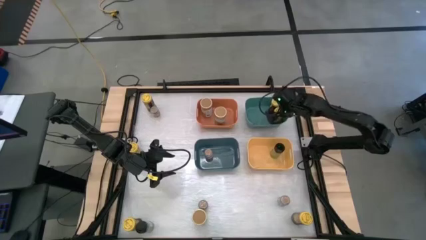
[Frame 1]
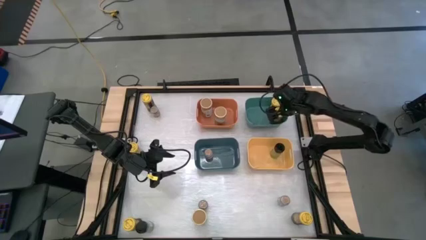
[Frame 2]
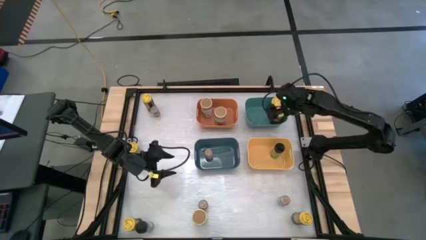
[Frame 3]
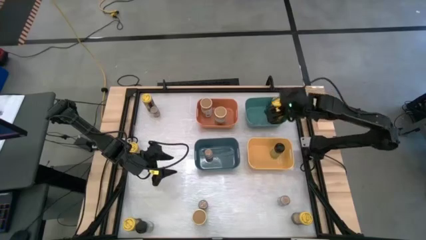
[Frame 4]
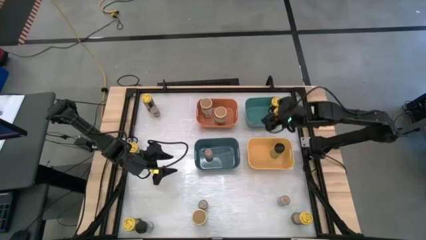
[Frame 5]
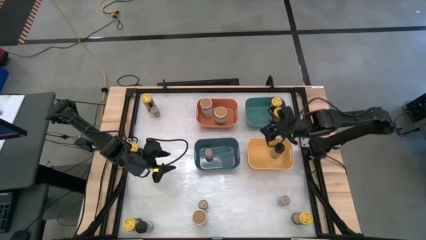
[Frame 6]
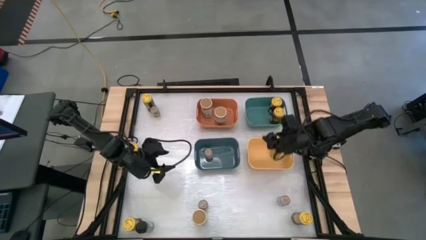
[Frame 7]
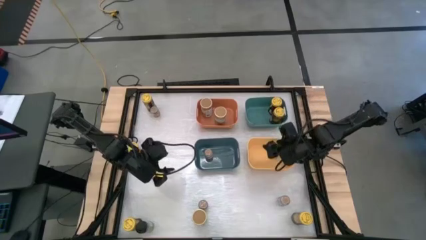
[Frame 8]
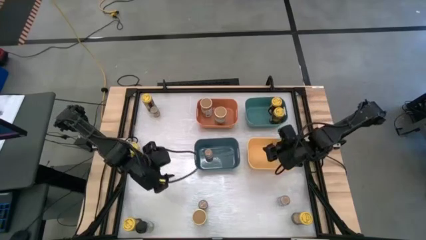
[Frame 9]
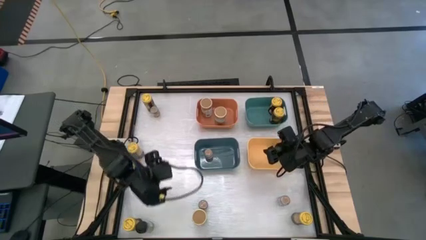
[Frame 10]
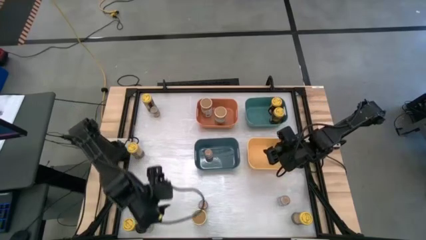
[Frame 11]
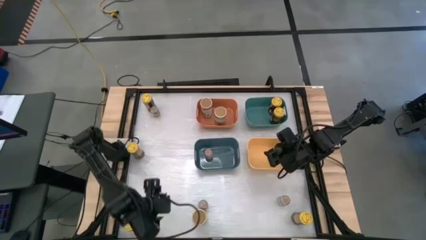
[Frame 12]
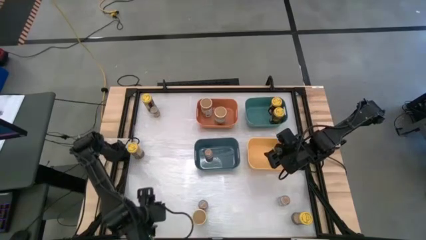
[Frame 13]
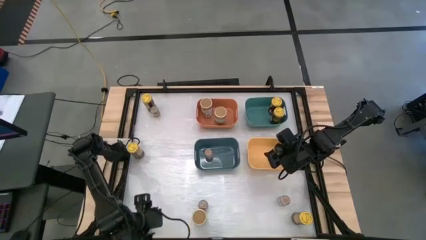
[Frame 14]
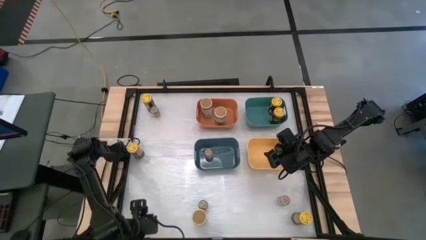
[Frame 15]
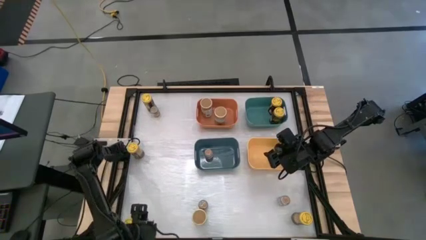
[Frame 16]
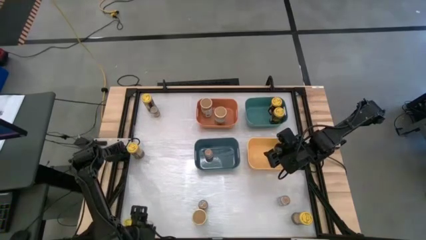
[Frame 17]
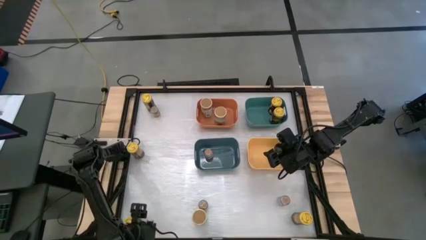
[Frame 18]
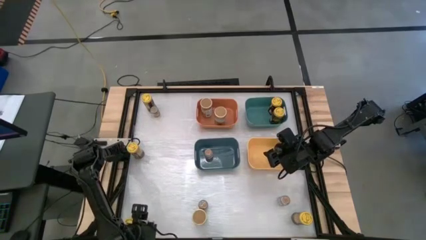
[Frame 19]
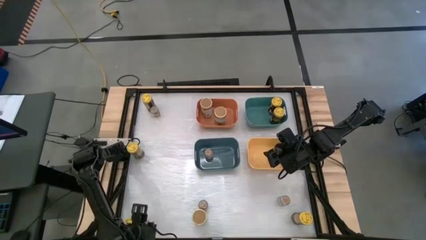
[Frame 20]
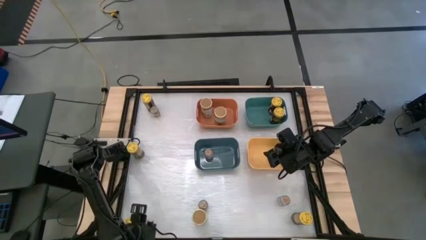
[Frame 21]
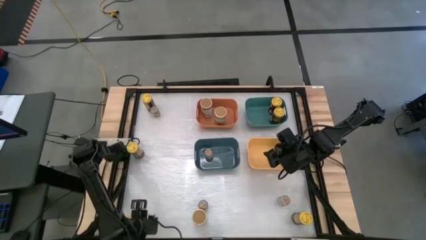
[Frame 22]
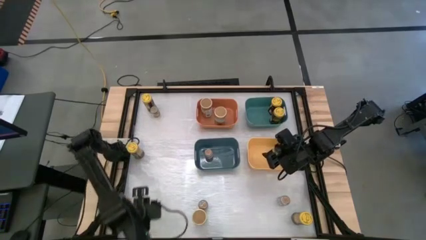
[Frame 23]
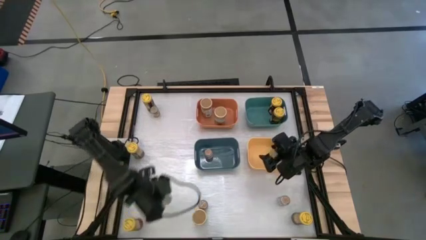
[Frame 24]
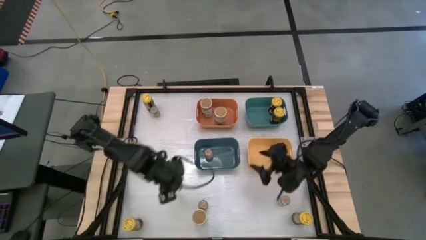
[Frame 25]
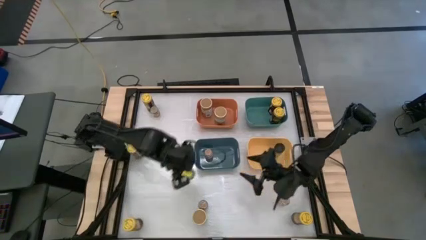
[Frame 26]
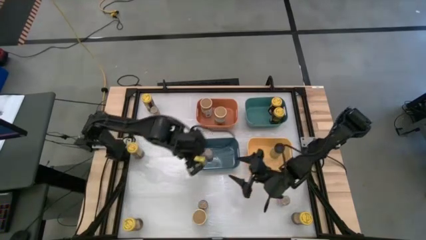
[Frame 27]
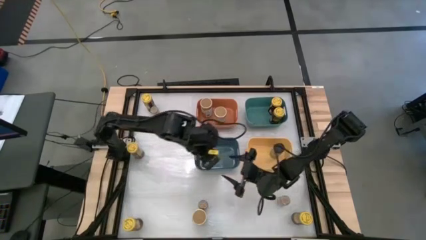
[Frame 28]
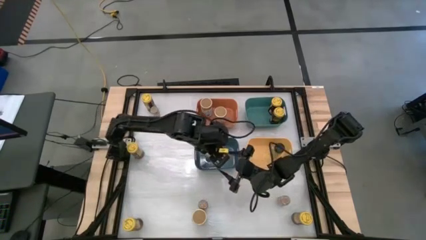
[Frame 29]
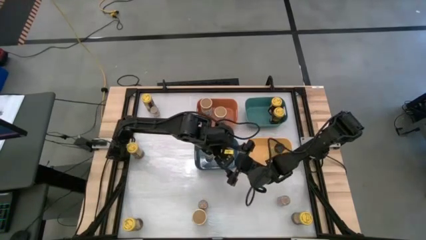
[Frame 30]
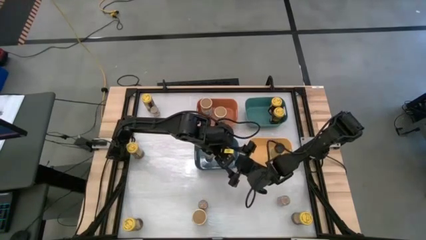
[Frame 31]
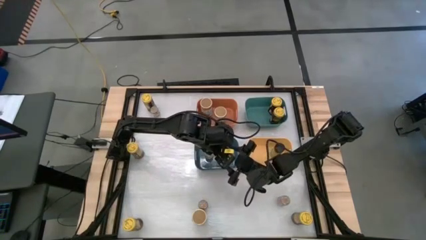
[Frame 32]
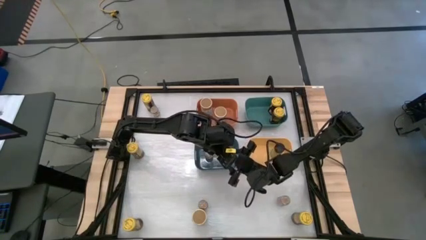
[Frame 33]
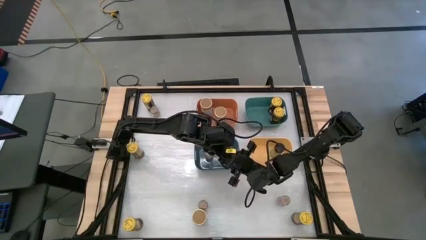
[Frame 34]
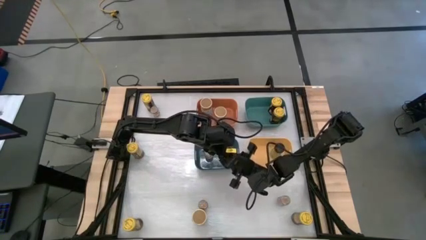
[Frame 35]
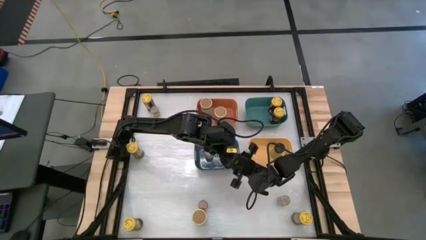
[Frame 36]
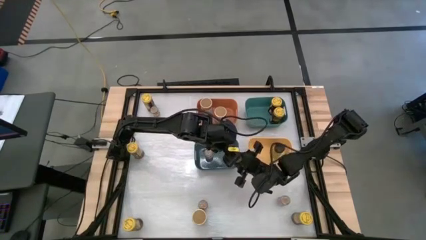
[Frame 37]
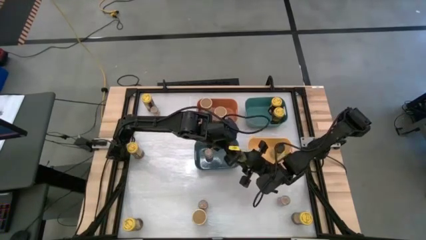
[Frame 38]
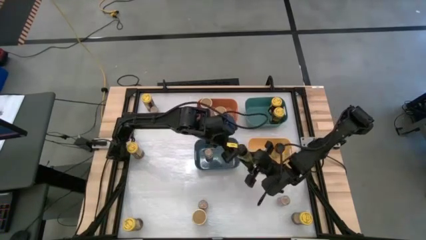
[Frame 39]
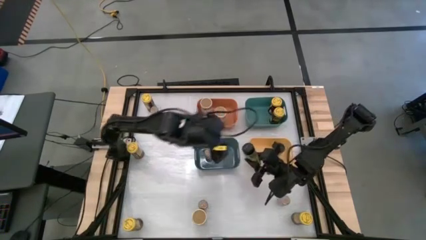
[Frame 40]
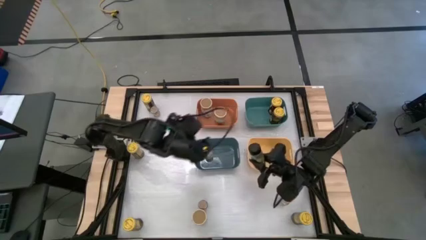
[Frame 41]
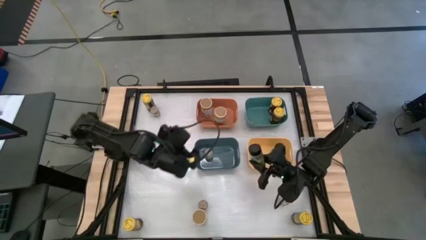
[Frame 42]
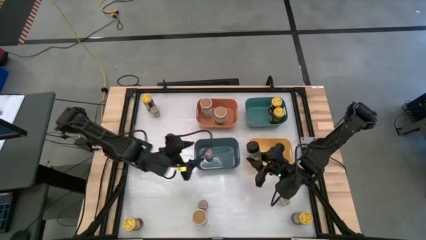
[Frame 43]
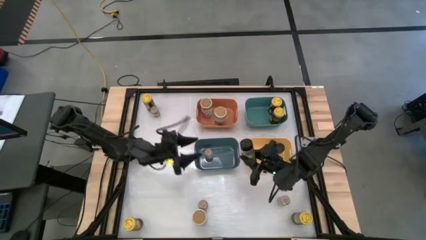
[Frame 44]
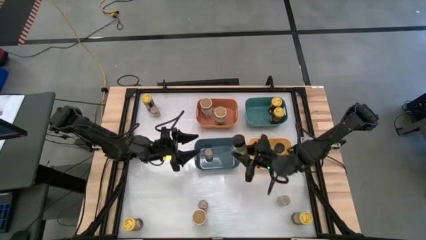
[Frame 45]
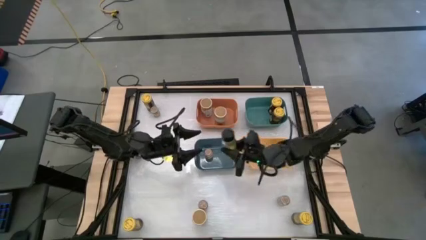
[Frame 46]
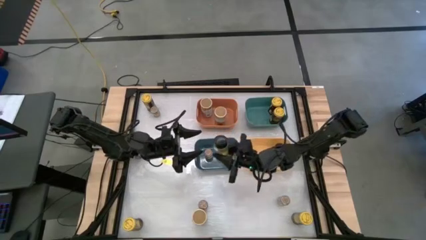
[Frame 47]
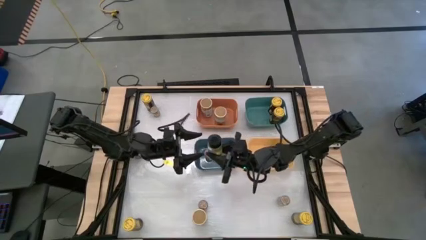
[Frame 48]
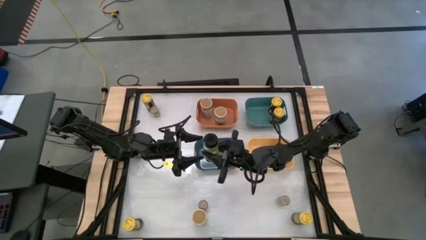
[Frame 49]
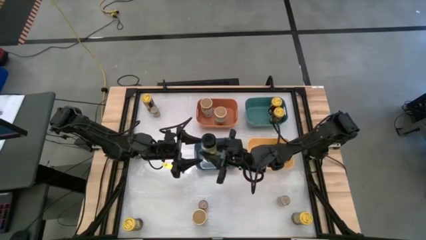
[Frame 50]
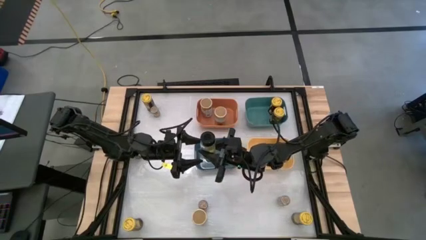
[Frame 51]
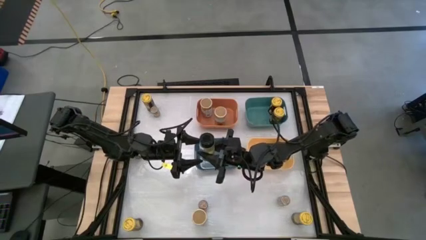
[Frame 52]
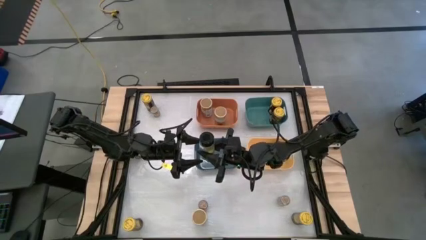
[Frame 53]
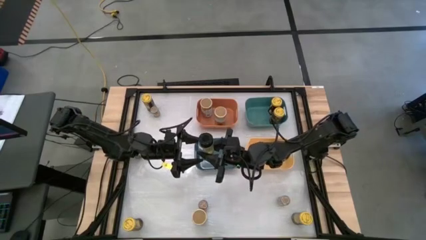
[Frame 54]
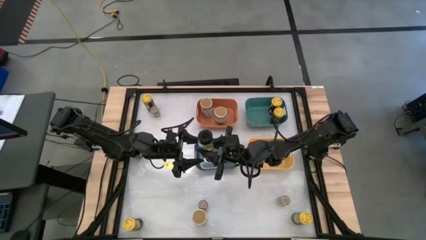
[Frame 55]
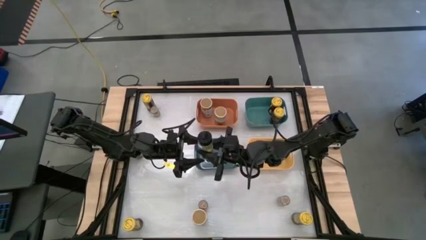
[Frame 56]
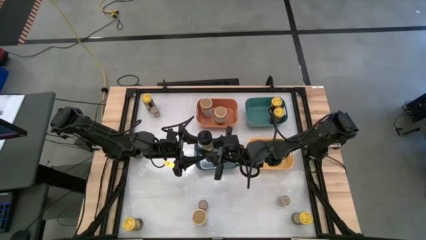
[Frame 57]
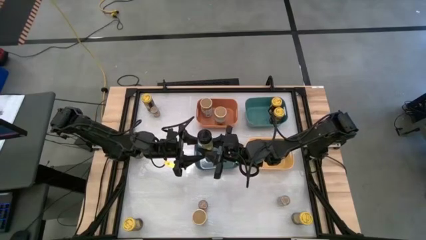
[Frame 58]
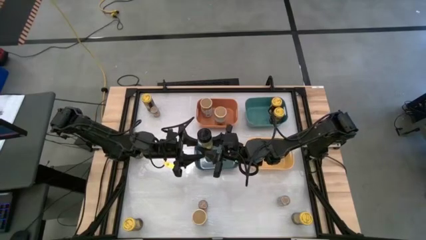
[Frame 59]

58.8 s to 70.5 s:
Task: Sort spices by type
Put the black spice bottle into the yellow bin

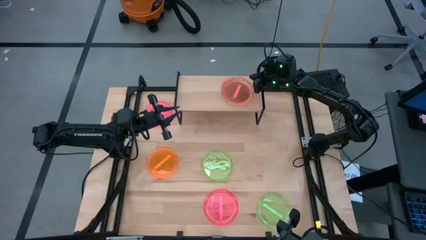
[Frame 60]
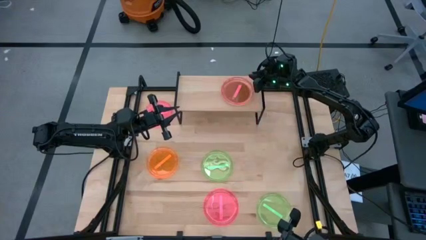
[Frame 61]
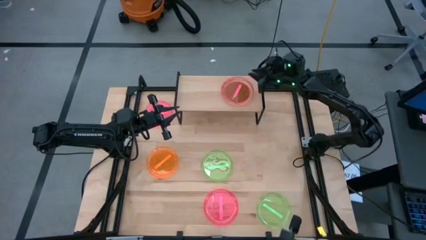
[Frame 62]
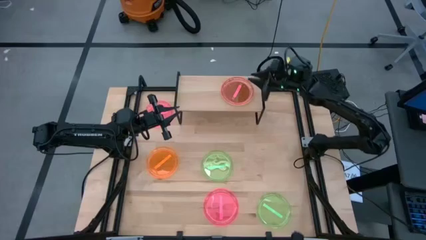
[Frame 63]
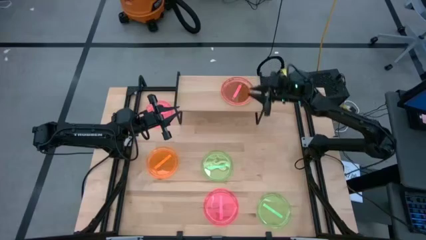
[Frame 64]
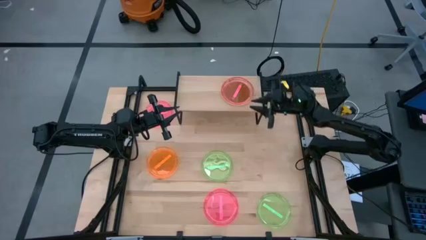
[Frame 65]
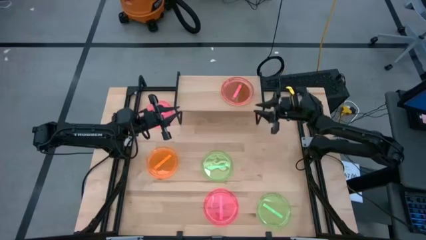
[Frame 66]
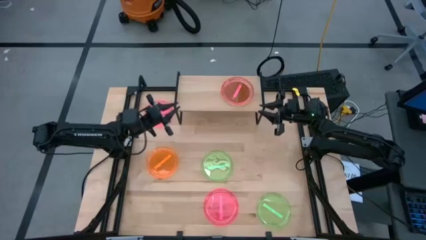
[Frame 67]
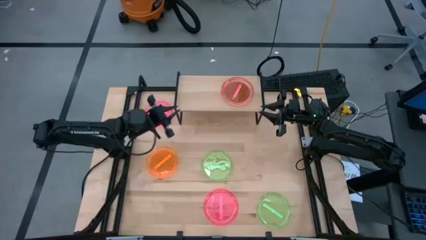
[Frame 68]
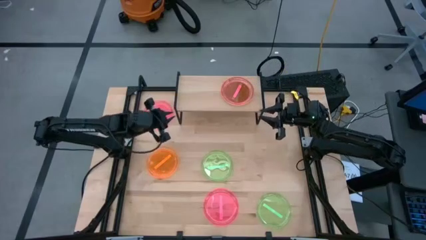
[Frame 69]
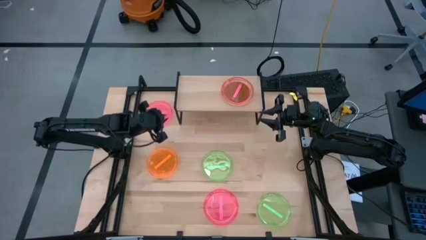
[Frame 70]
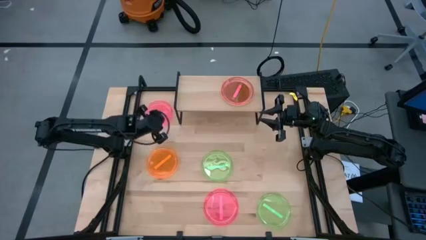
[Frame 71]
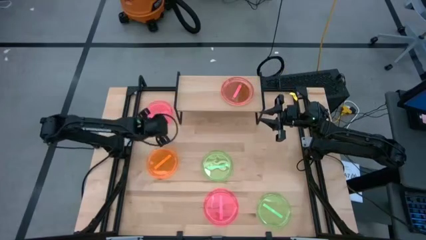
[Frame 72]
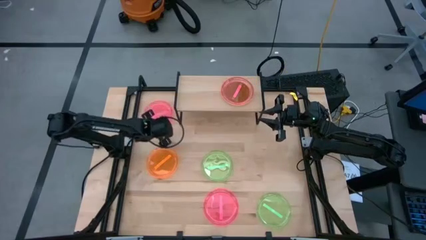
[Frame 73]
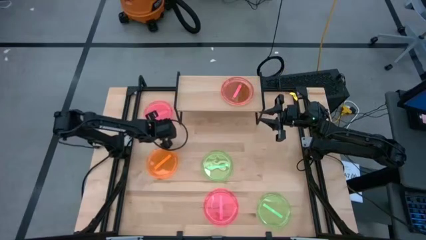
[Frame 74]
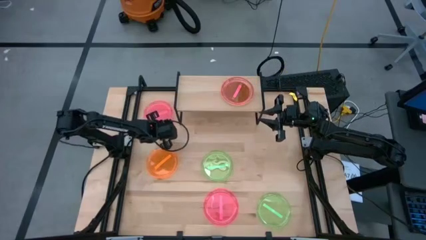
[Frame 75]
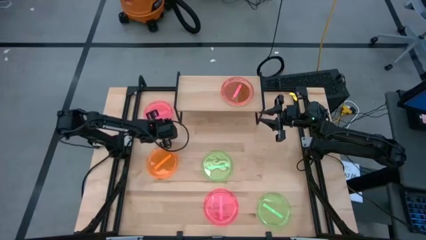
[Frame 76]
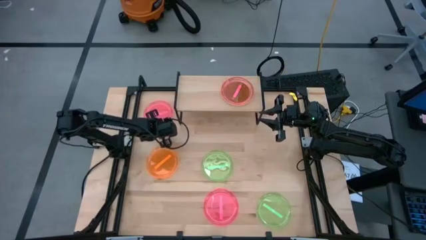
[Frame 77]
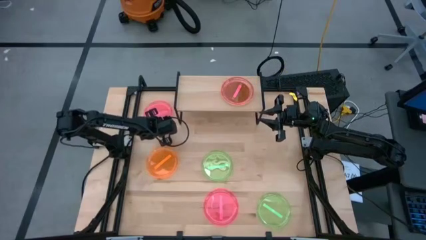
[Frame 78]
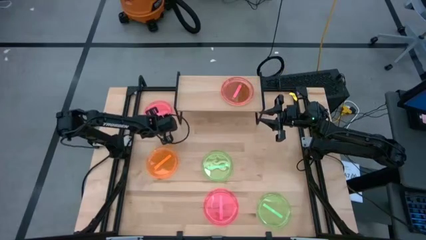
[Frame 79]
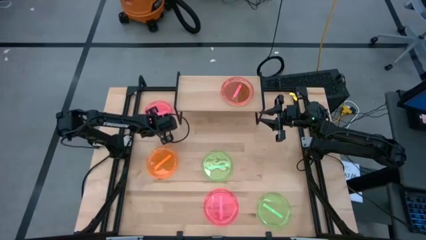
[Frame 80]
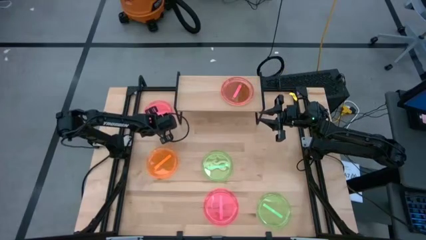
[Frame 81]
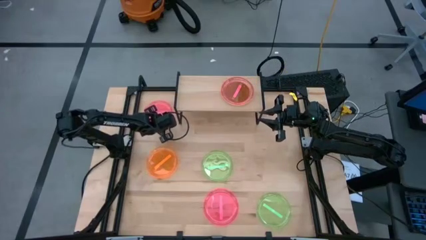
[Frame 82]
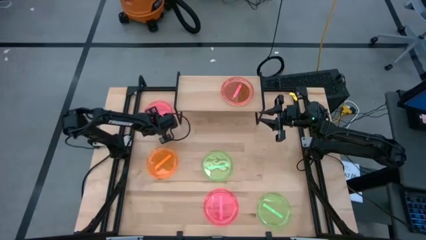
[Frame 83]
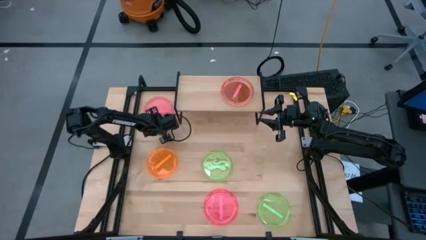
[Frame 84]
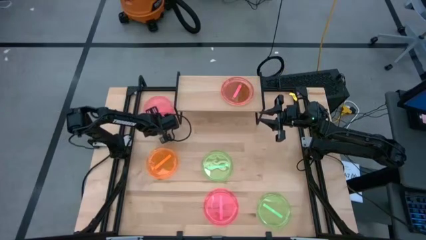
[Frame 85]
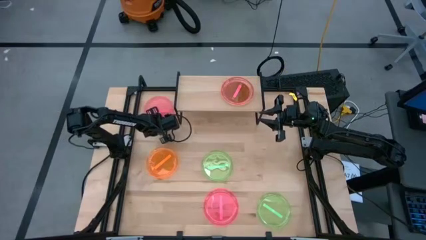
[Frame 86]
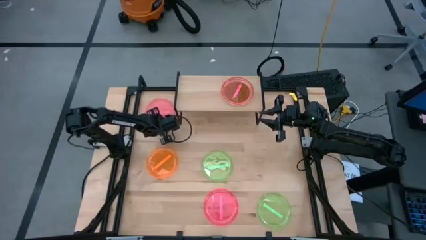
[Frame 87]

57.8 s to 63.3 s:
Task: Place and stack plates onto a shelf
Stack the pink plate on top of the pink plate on the shelf
